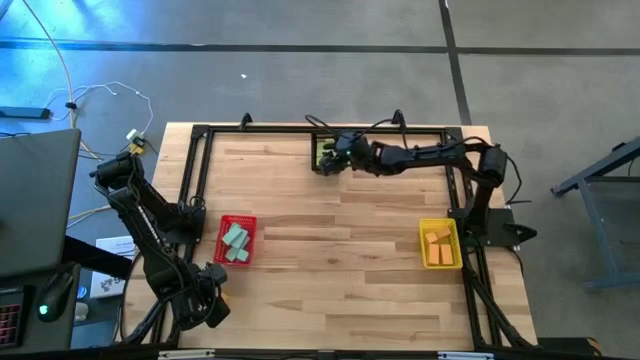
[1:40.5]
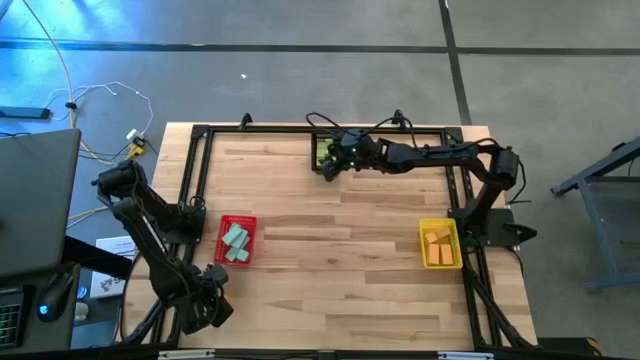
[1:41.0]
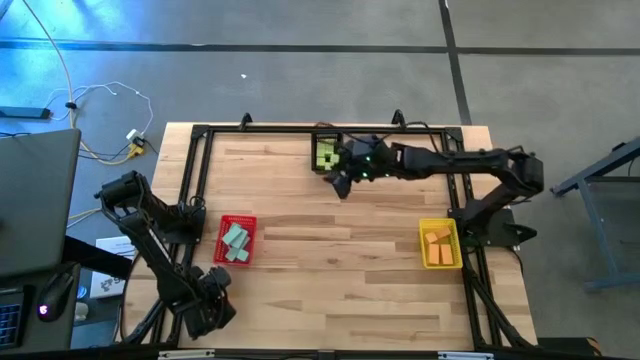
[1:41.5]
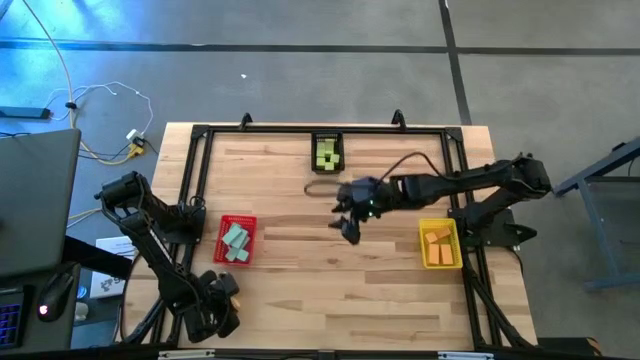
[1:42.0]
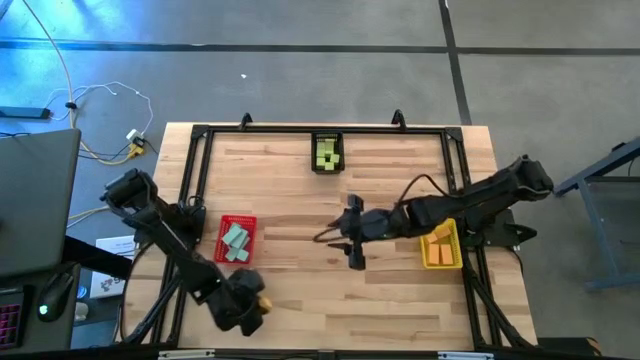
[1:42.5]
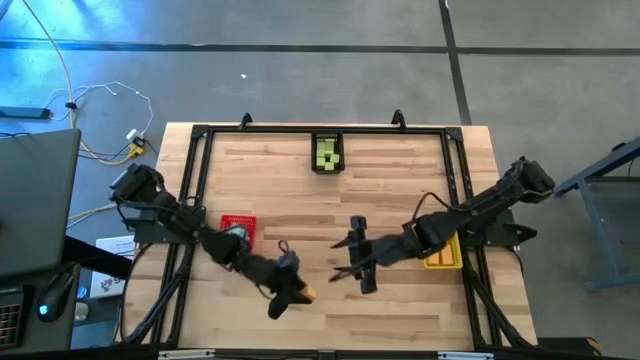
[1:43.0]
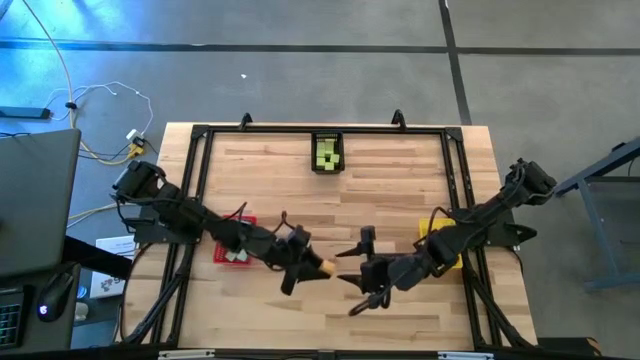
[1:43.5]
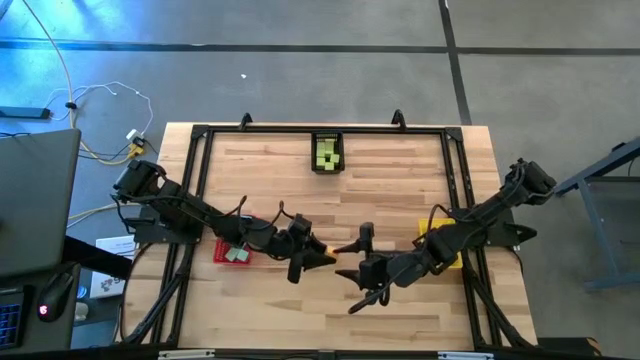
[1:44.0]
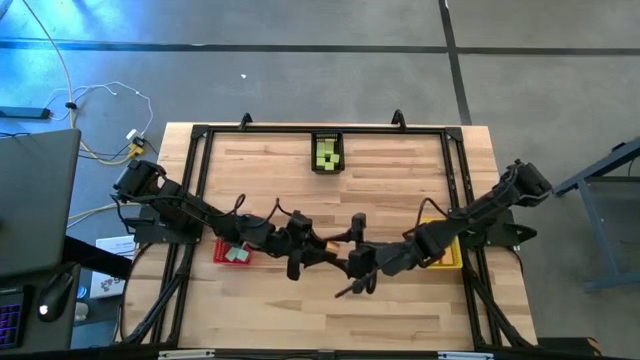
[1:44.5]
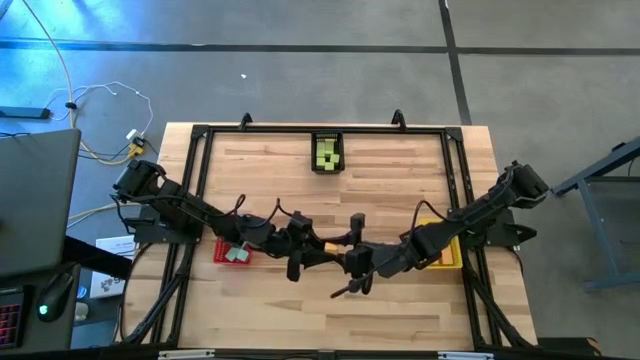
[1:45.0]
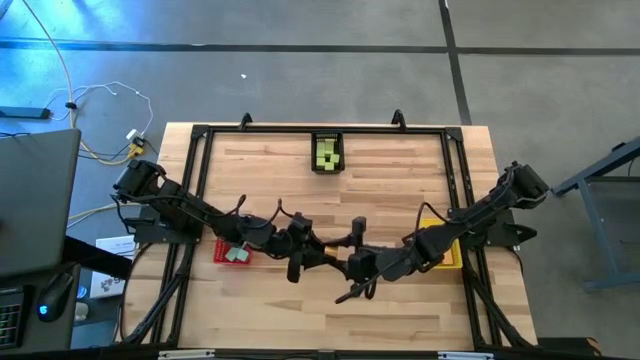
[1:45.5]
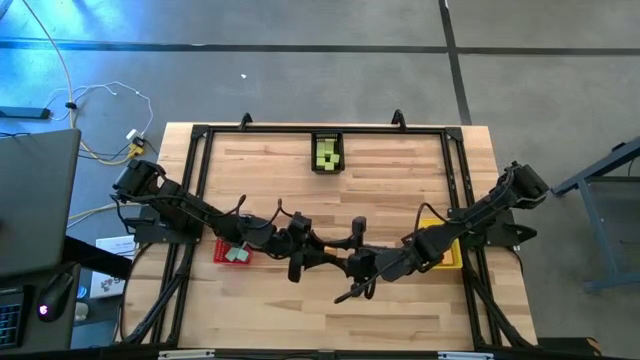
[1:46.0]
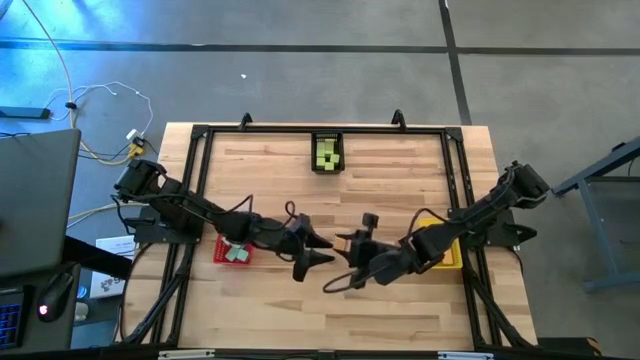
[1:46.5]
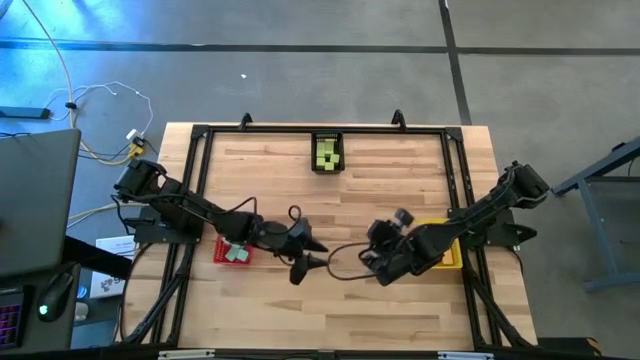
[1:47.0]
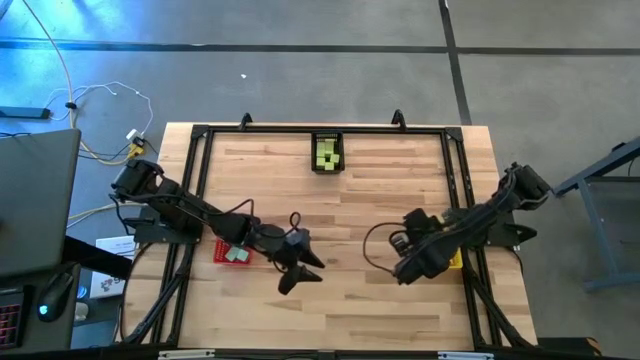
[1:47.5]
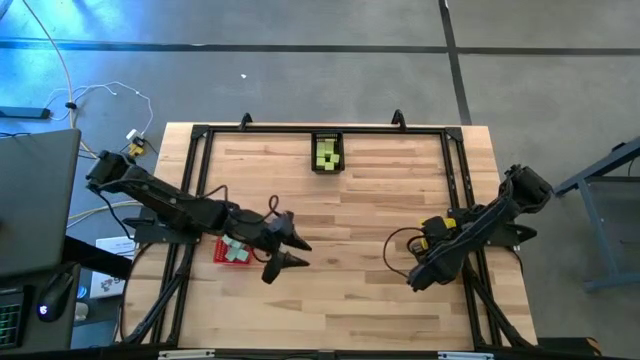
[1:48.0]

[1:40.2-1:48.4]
Task: Sort & place blocks by color
Put the yellow block into the yellow bin

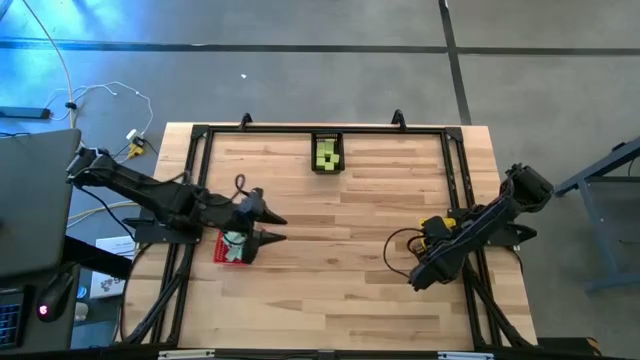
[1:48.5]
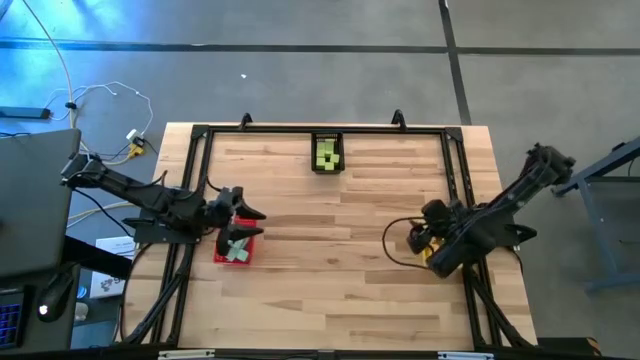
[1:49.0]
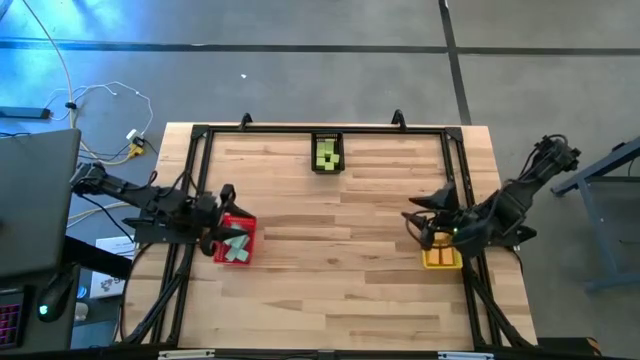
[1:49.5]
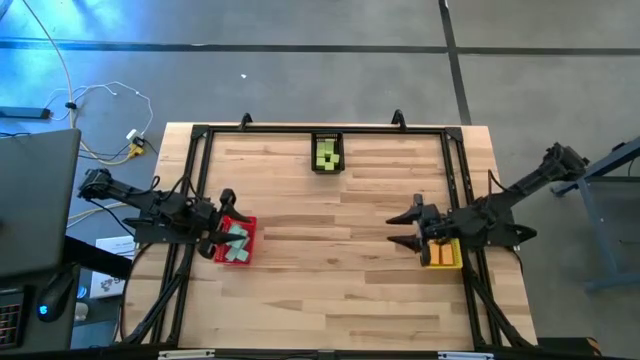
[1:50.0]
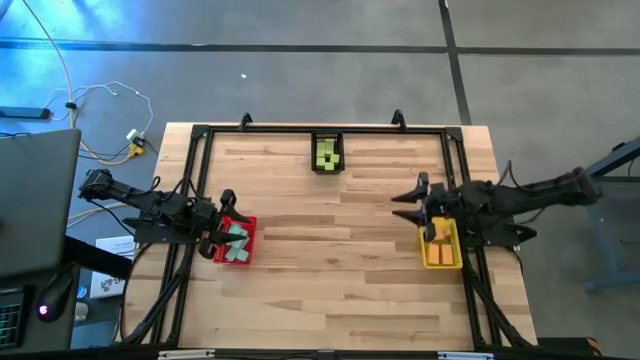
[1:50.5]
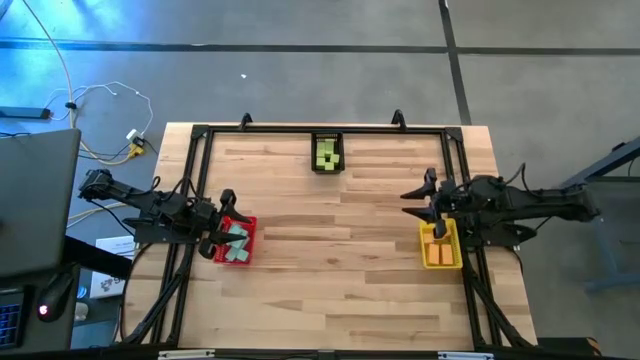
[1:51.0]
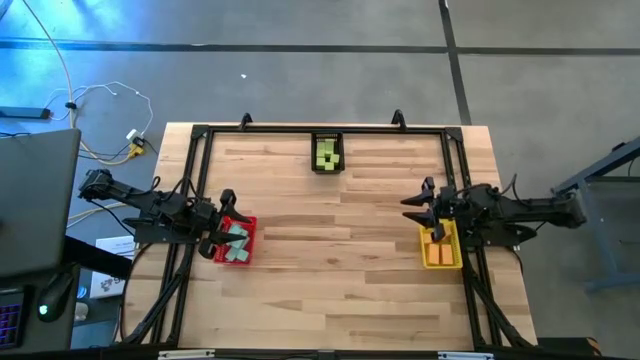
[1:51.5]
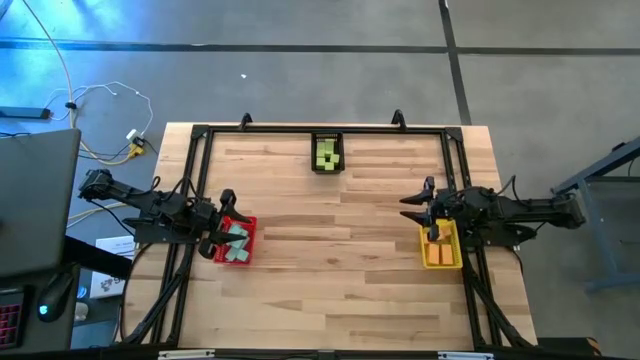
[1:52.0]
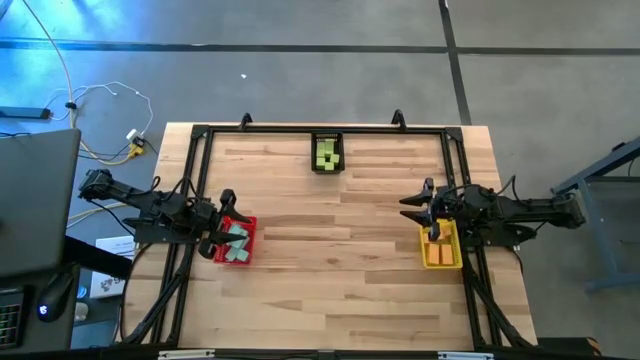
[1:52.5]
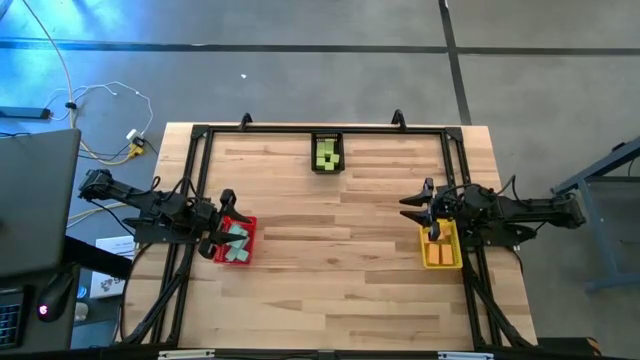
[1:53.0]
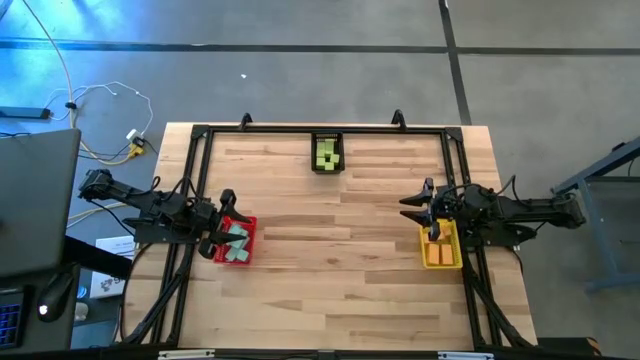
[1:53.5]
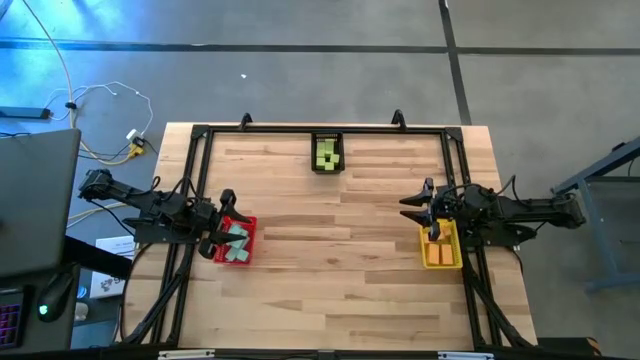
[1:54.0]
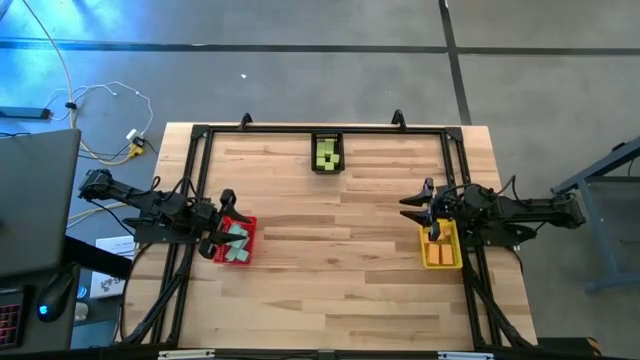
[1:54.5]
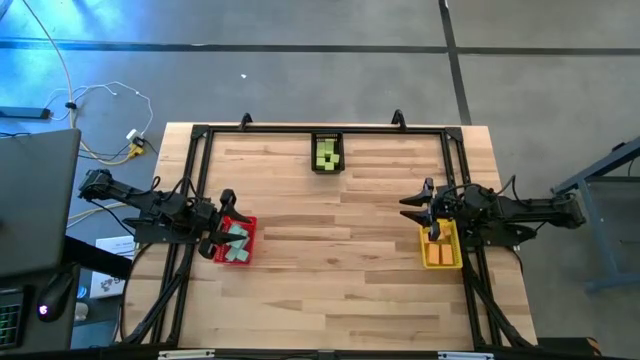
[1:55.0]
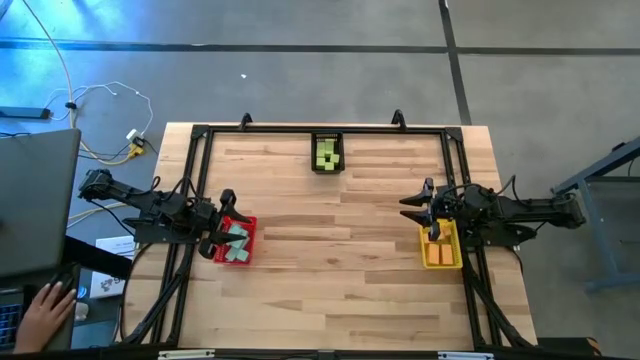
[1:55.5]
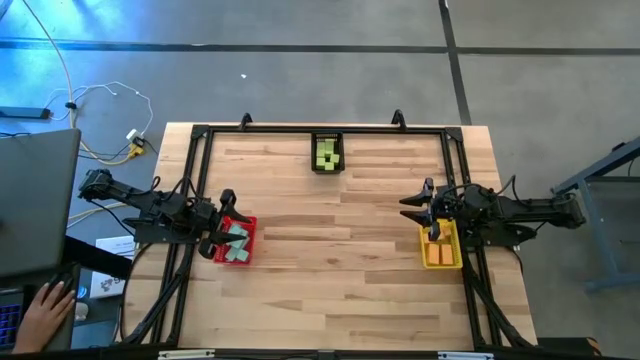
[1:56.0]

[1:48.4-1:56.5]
Return to Home Position

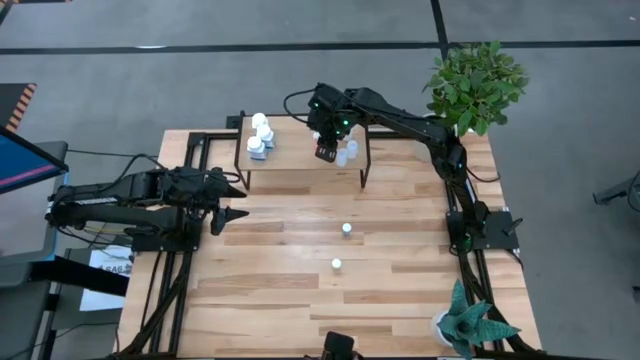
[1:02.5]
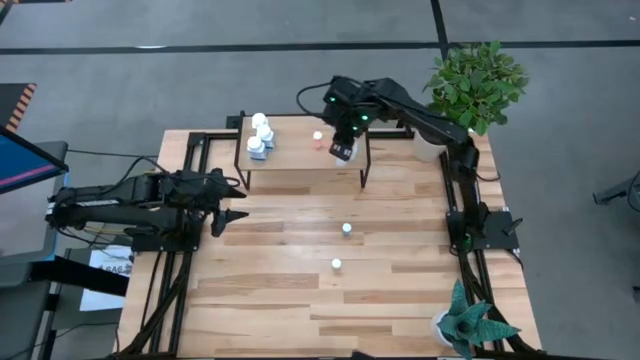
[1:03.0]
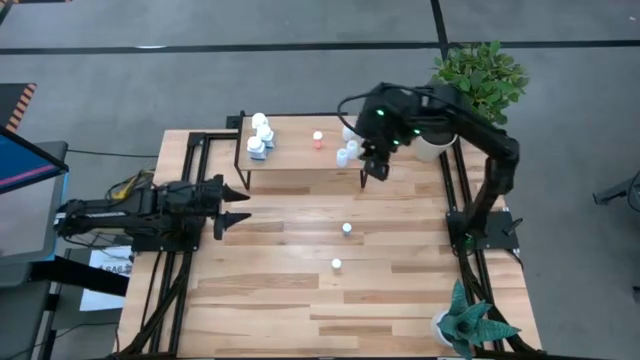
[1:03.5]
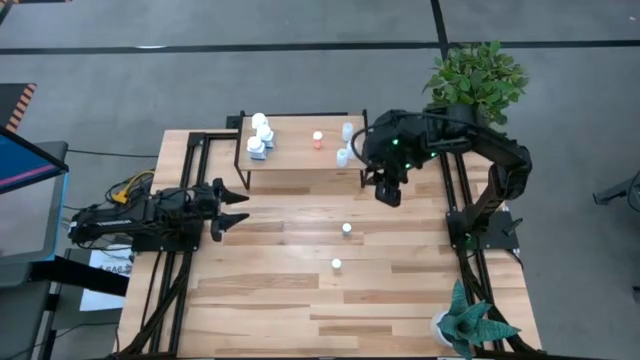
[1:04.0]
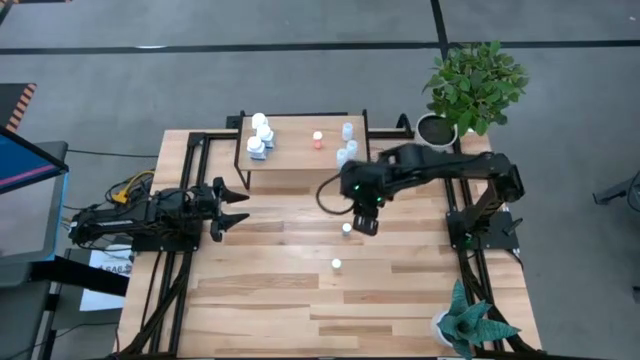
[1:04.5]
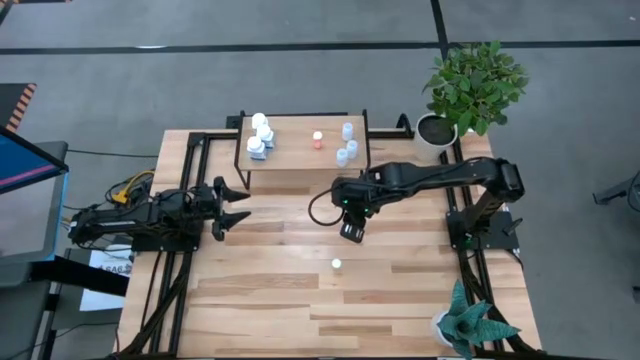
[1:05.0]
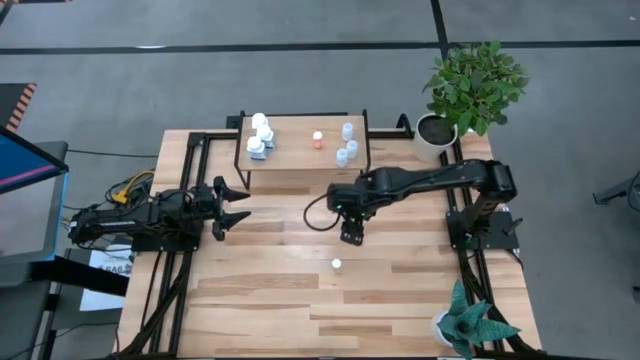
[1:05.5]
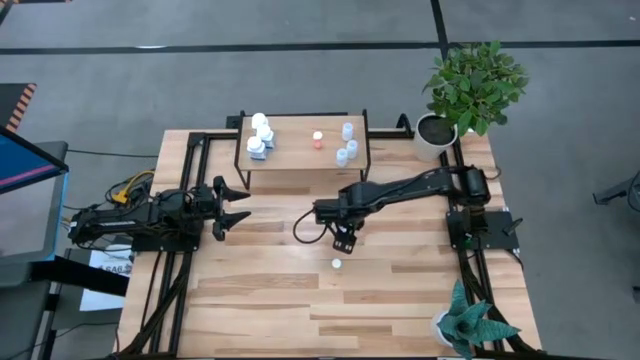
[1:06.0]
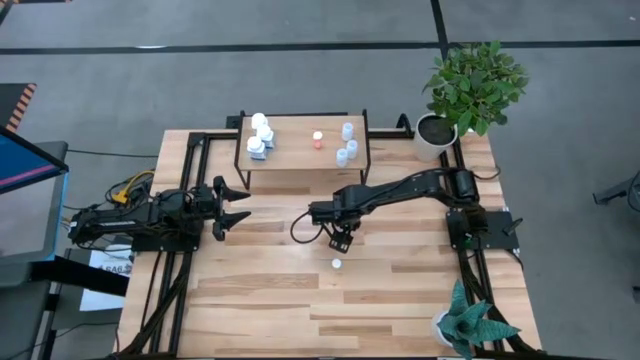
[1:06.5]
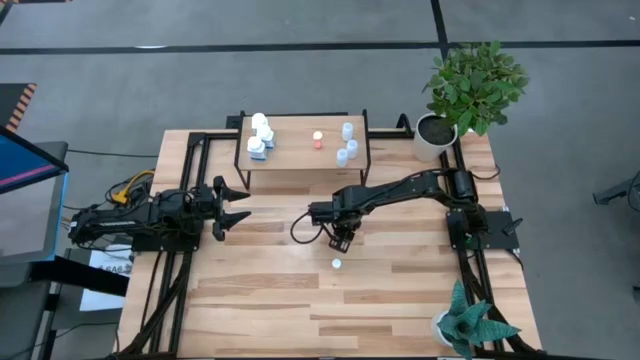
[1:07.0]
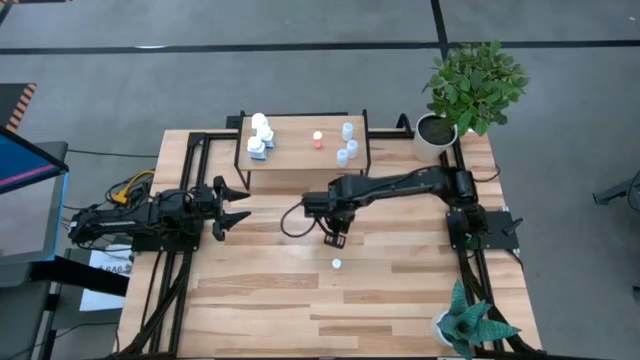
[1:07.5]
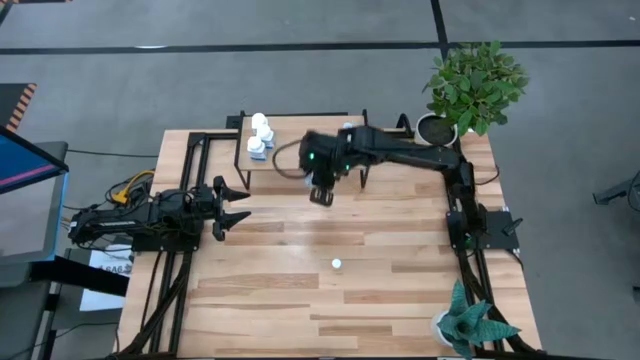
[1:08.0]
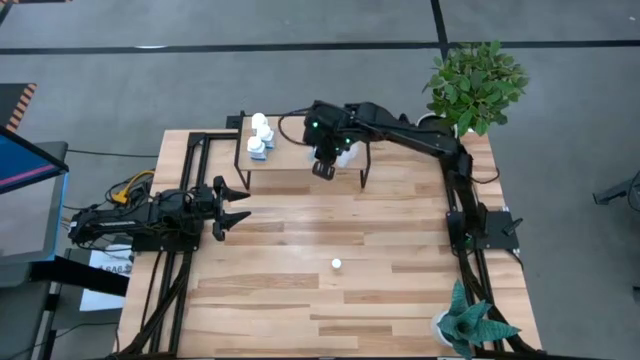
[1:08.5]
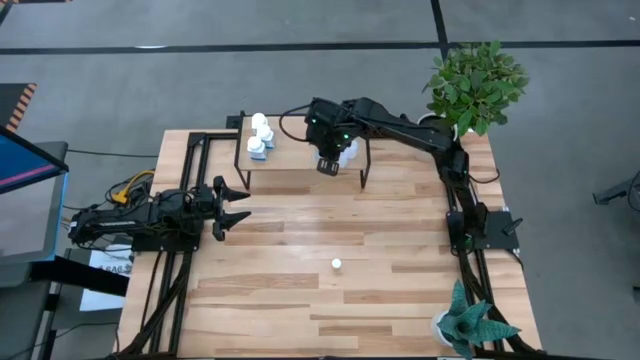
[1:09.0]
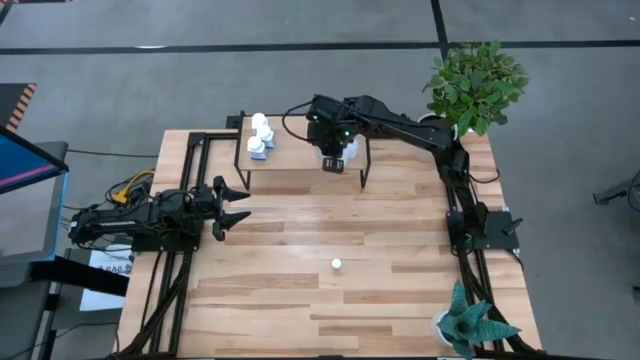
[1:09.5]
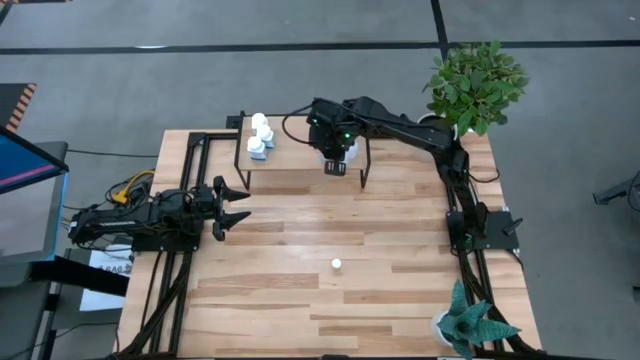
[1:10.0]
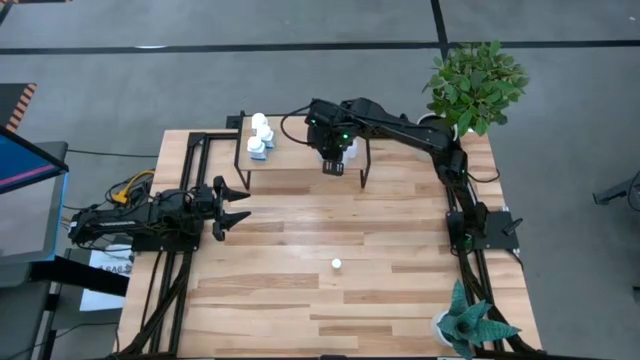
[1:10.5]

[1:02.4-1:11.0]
Task: Pick and place medicine bottles onto shelf by color
Put the blue medicine bottle on the shelf
